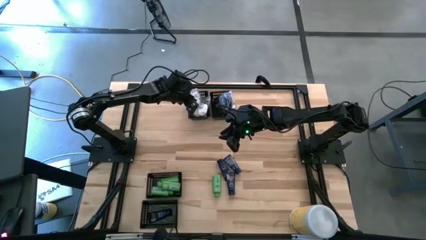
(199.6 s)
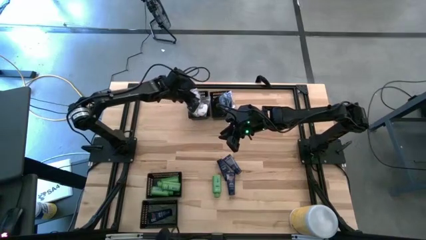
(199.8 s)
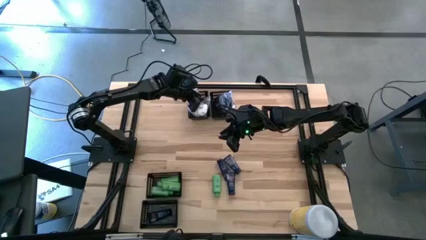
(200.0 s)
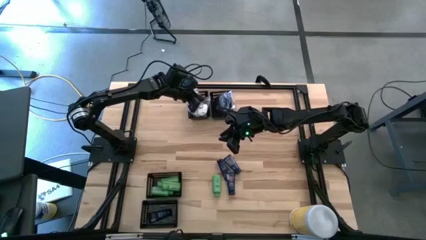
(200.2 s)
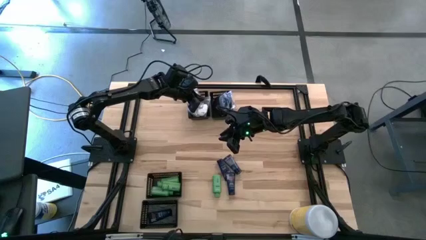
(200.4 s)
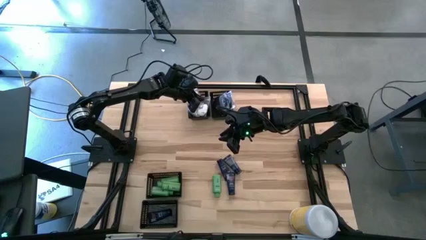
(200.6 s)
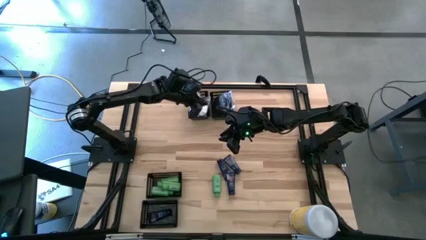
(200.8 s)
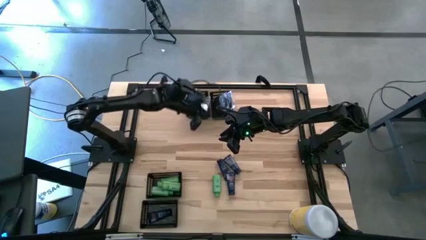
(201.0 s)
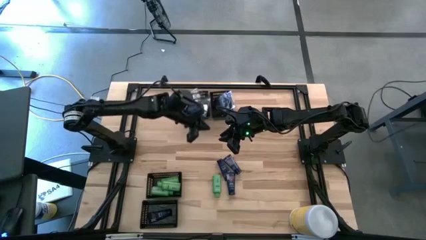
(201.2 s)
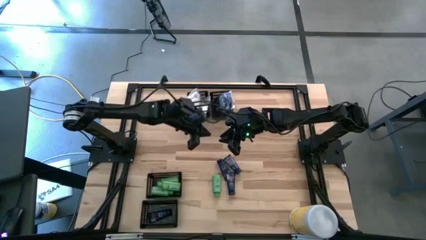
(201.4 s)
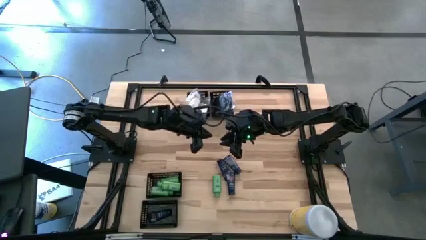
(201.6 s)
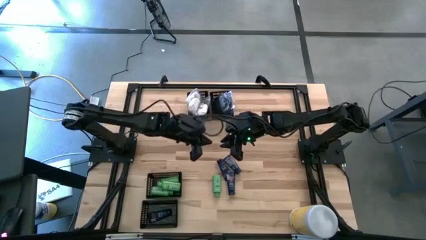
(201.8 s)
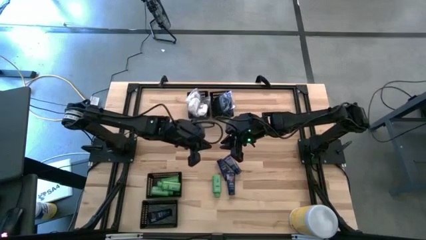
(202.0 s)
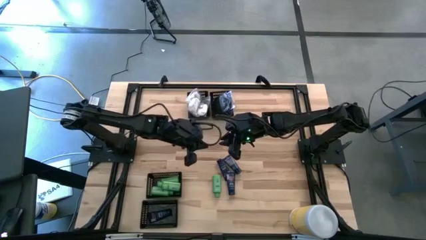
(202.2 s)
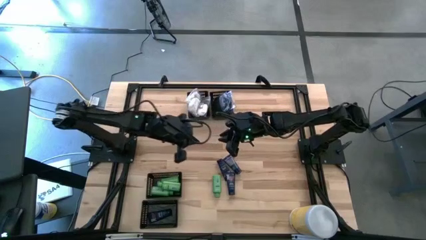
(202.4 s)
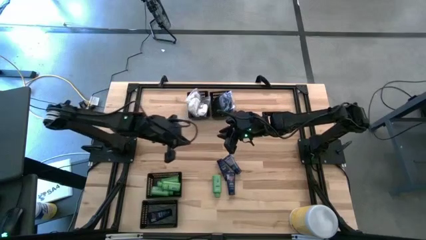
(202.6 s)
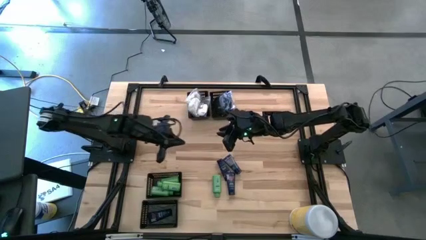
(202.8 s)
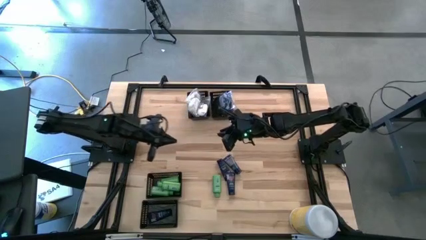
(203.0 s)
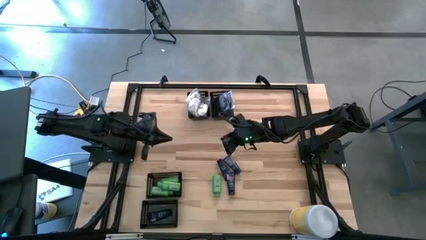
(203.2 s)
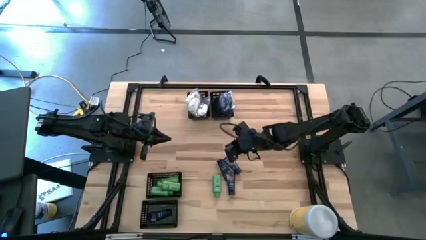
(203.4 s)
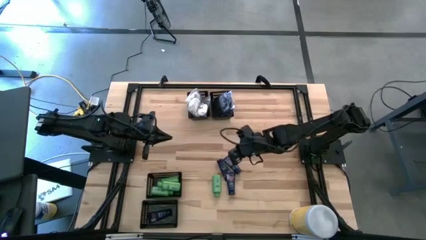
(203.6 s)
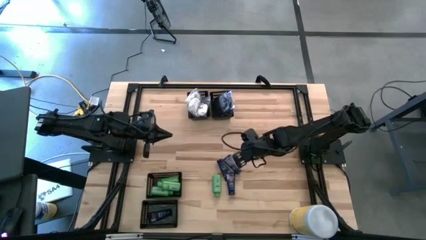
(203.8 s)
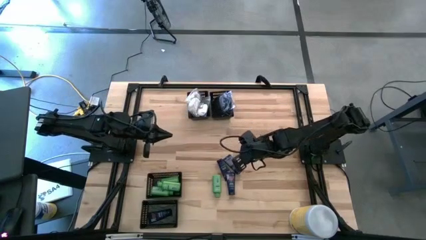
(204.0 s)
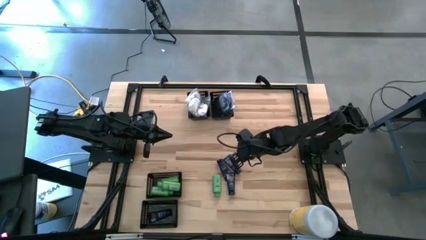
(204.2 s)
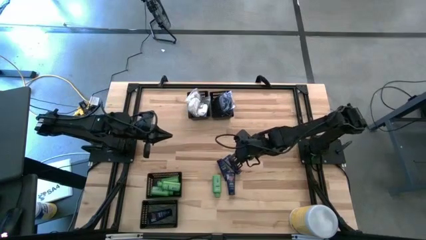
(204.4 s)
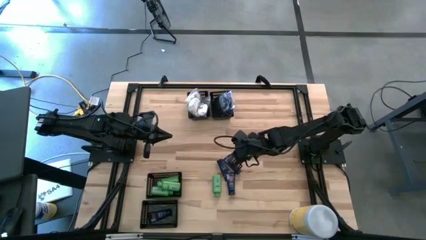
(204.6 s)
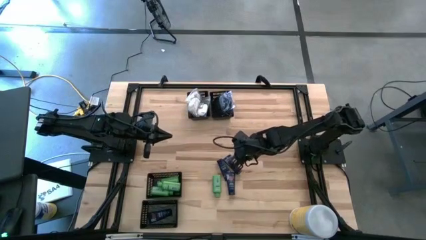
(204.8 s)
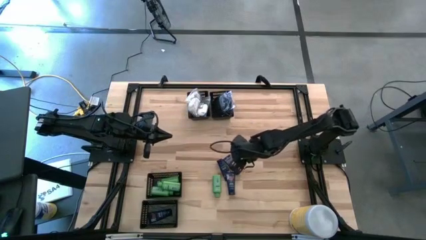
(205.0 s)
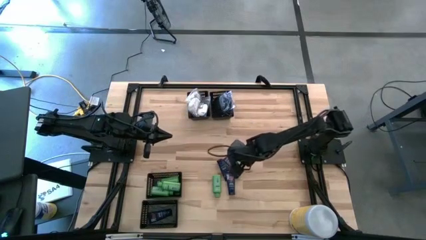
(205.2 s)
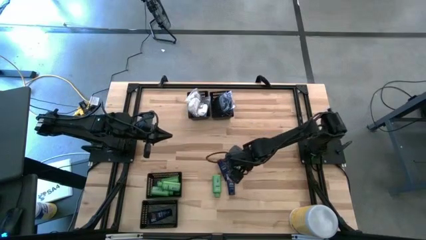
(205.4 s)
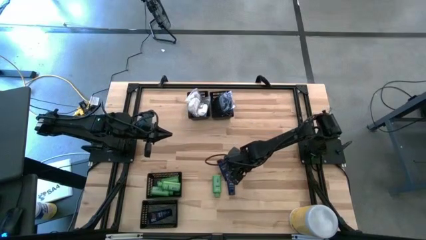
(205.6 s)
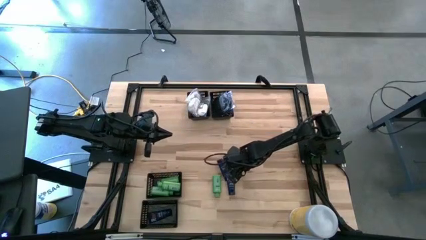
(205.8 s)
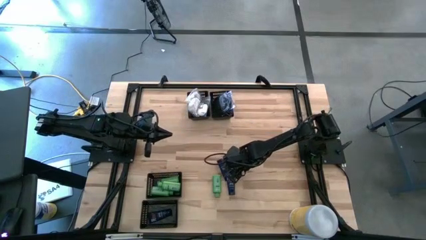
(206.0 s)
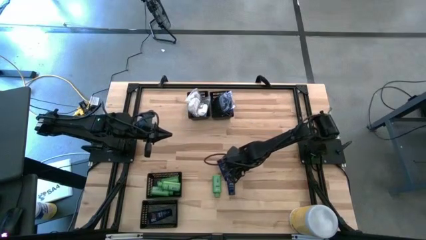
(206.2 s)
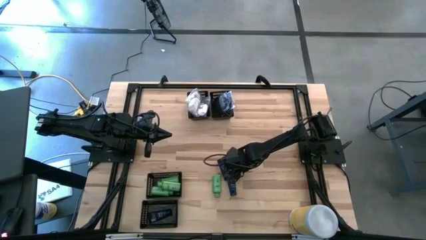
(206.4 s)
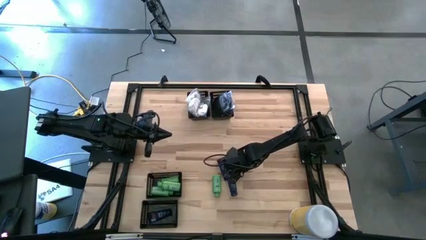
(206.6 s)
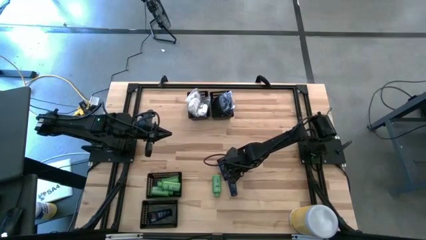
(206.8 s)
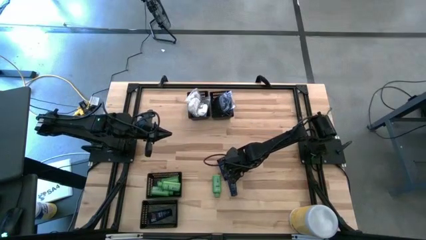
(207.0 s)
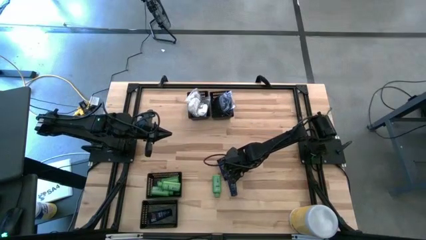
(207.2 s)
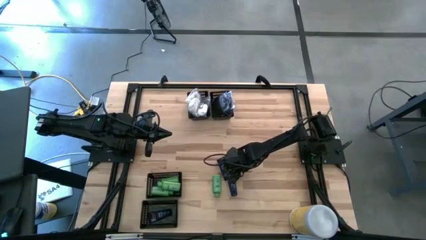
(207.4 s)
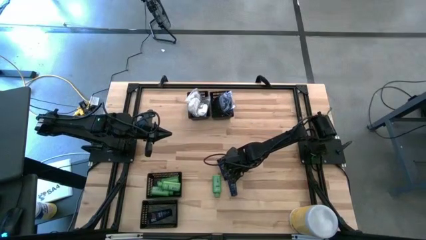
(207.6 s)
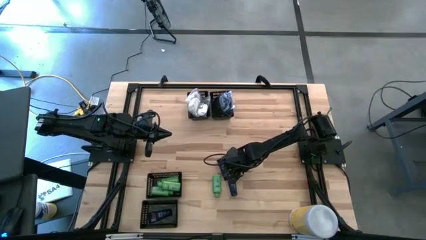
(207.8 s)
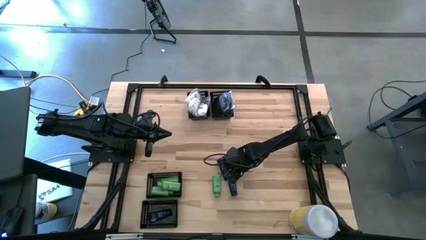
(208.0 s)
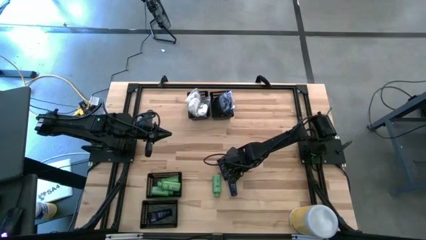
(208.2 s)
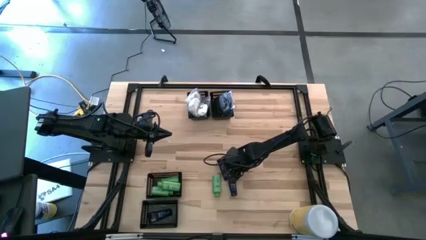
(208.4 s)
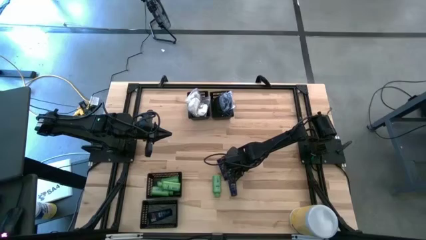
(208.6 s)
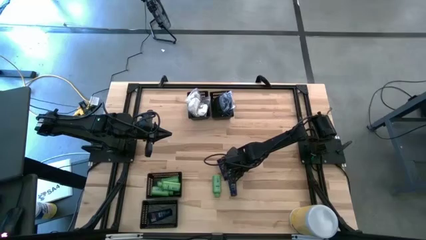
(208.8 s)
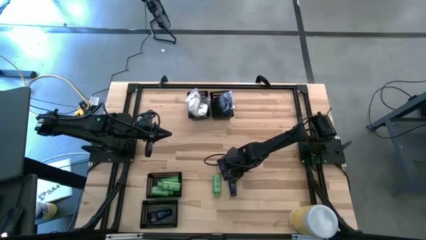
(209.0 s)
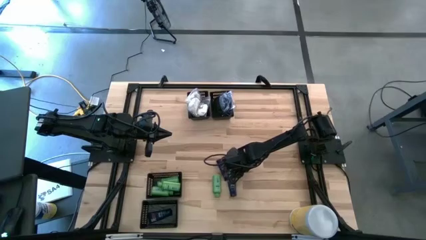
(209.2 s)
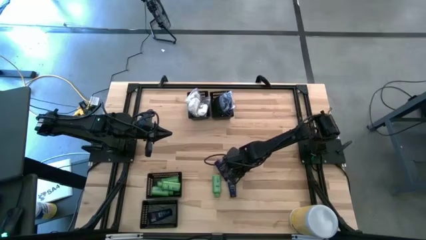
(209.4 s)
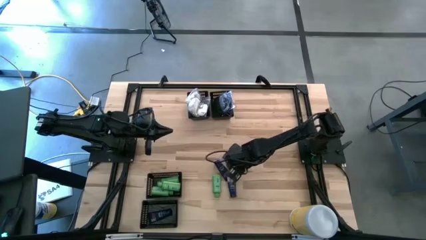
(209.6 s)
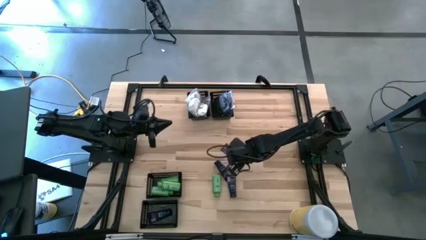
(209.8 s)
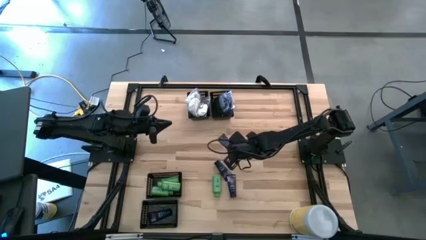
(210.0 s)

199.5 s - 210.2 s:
Task: Pick & Place Travel size toiletries
Put the dark blue shave cream into the bottom left basket

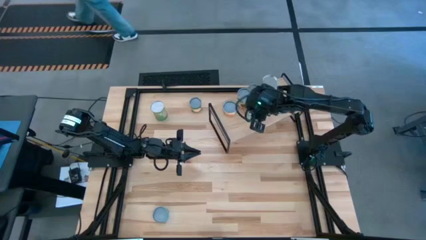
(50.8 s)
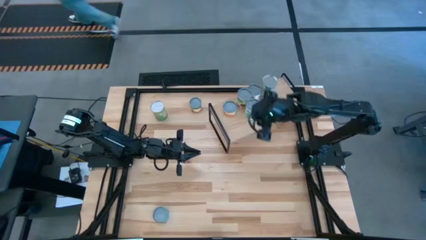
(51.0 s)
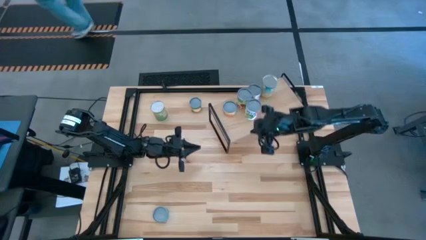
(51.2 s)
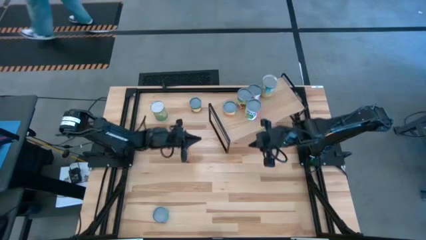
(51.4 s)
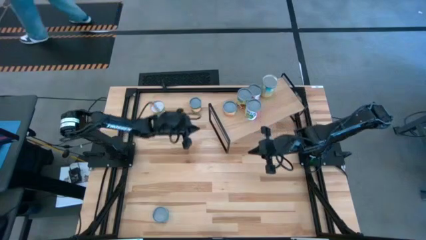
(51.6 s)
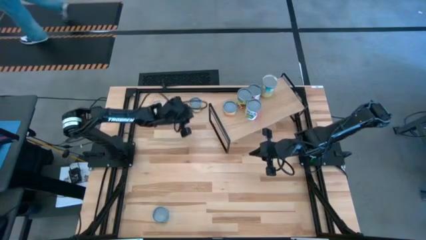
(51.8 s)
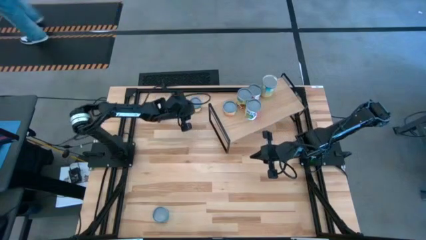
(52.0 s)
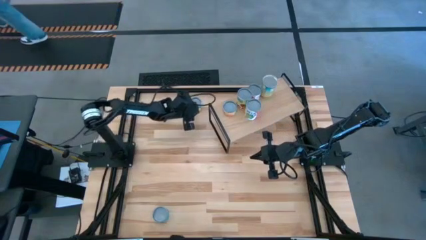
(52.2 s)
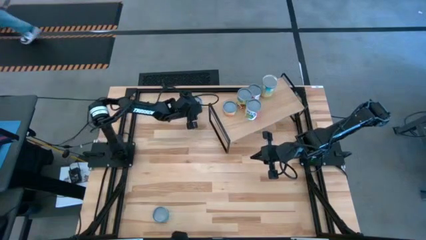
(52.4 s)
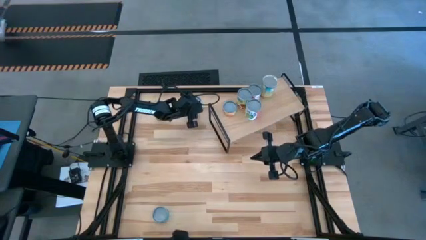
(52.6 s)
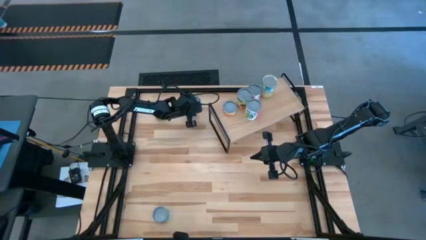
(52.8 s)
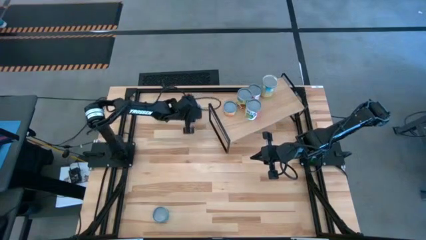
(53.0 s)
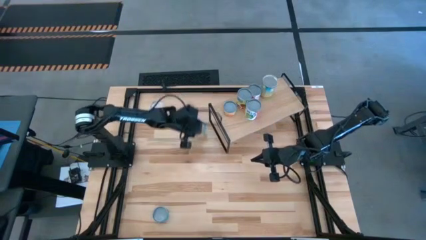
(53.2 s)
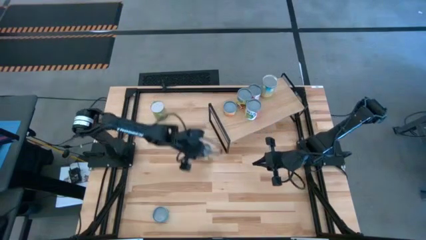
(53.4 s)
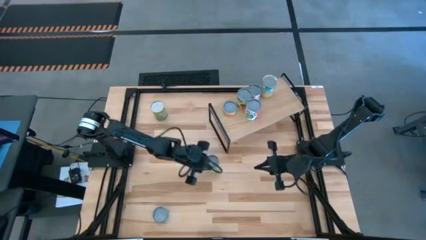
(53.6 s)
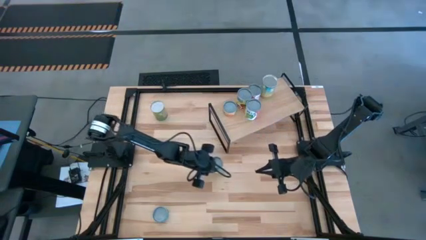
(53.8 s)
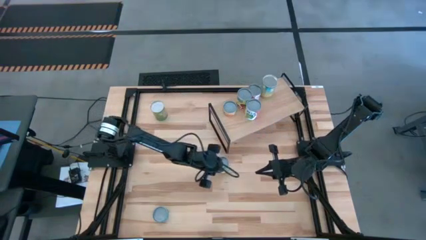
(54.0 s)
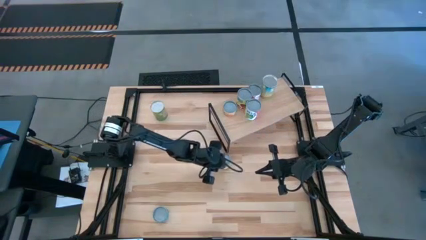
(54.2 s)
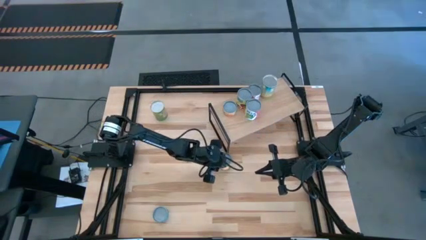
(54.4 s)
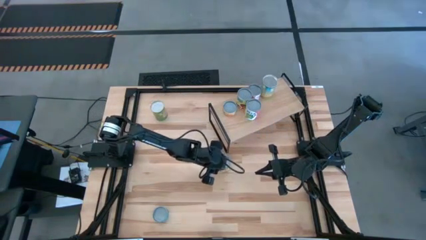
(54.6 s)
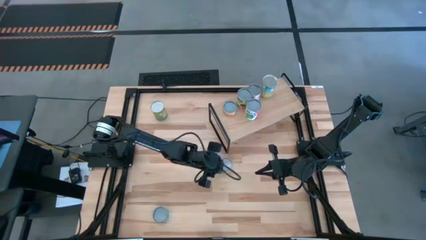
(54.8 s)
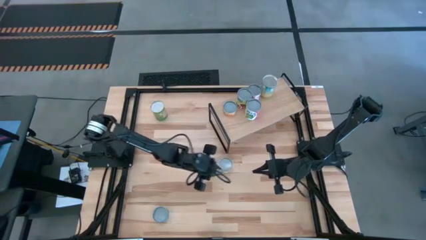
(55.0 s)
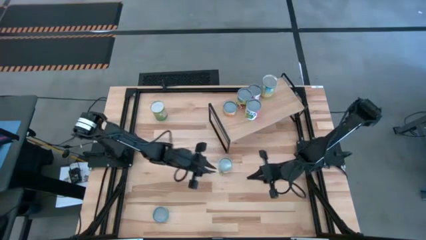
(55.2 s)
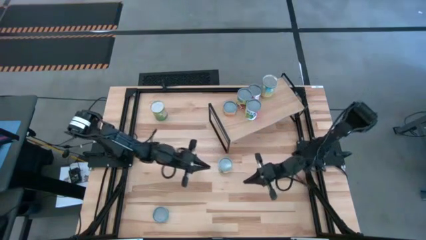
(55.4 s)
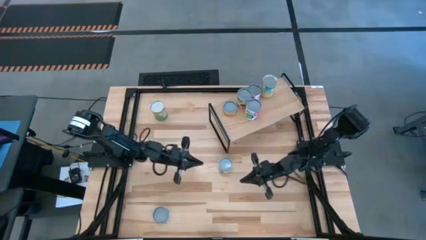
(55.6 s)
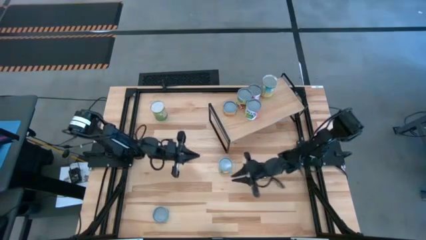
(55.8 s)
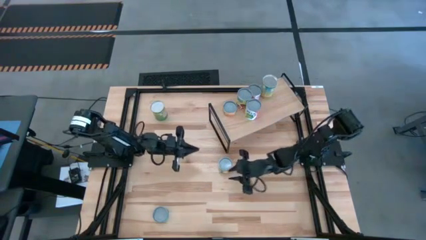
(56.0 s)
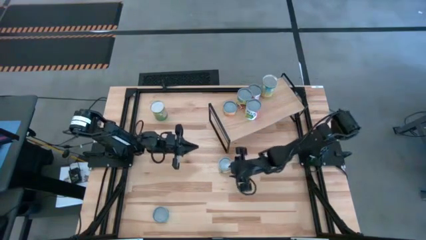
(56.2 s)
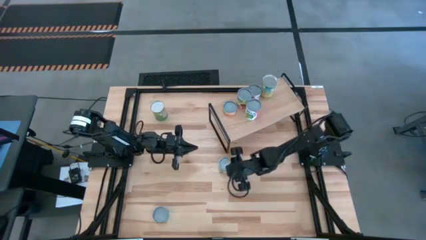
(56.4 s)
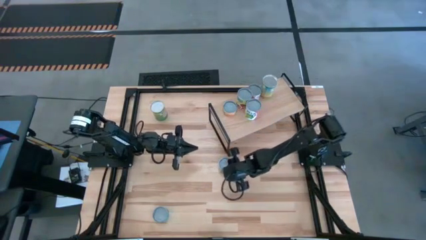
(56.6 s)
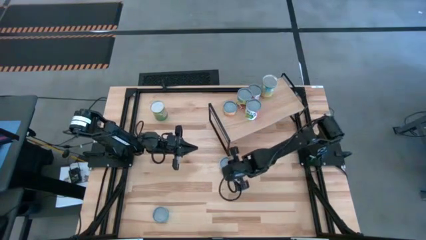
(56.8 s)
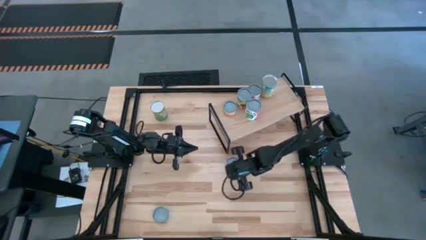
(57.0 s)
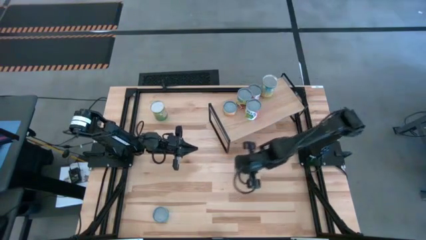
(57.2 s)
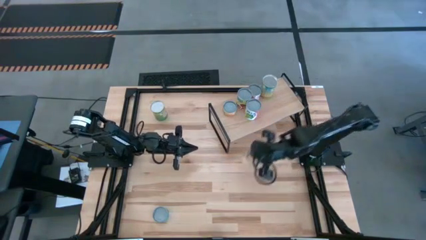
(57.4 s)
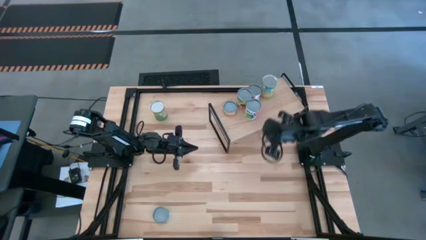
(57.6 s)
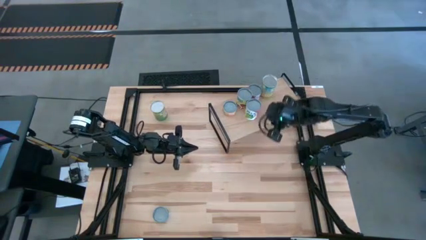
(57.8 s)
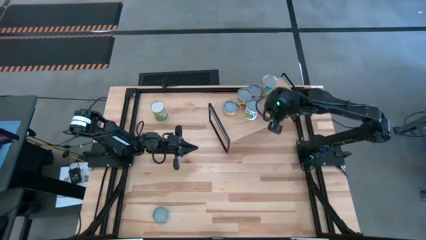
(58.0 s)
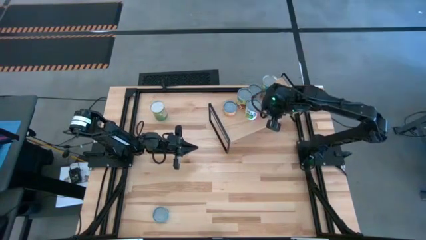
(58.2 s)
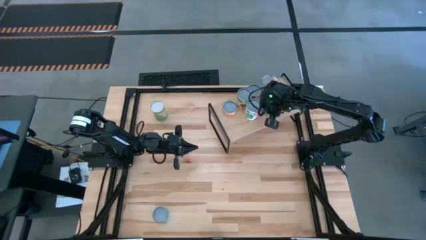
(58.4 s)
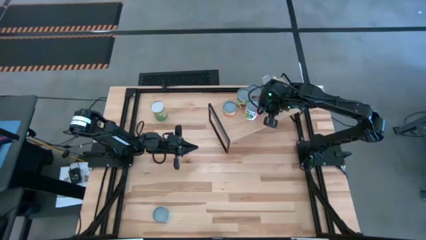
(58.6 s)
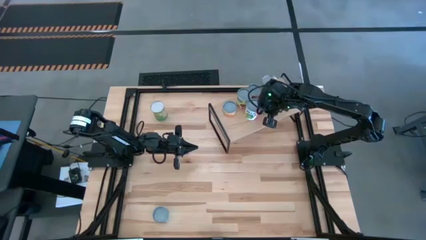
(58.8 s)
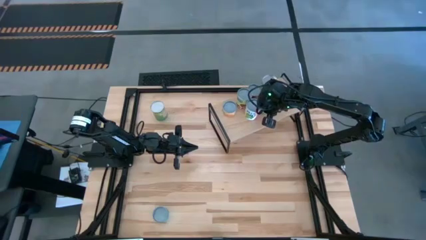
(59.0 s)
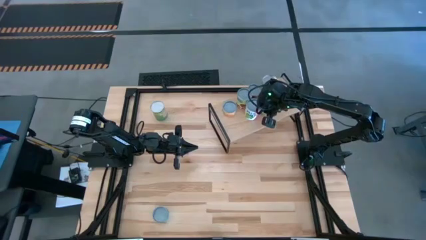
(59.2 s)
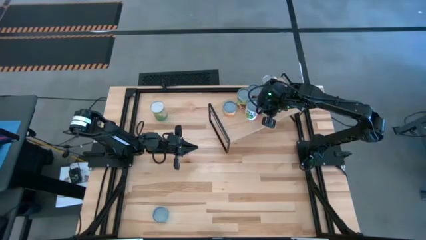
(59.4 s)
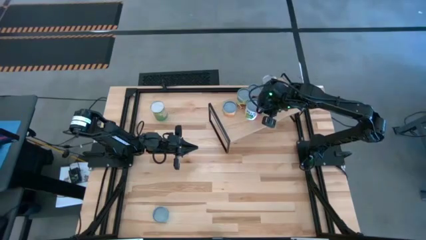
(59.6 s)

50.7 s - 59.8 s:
Task: Pick and place cans onto a shelf
Put the canned peaches on the shelf
